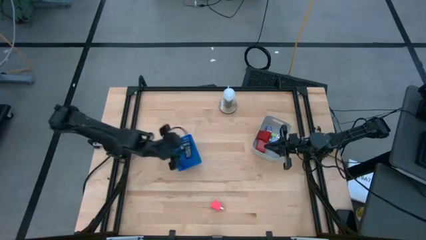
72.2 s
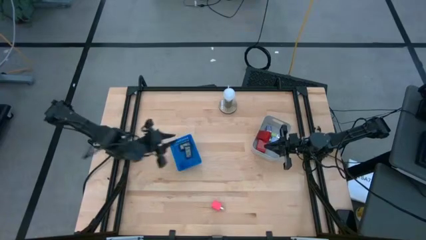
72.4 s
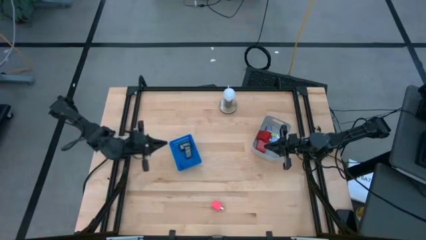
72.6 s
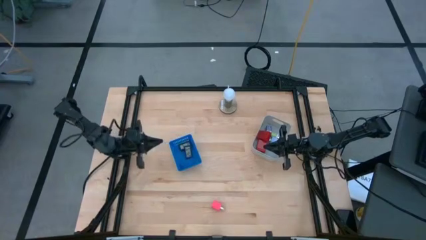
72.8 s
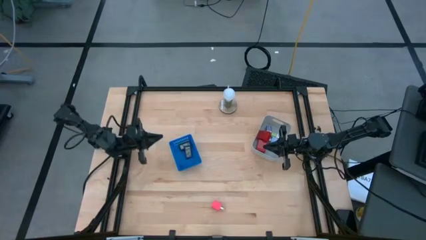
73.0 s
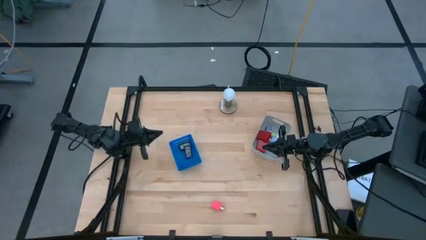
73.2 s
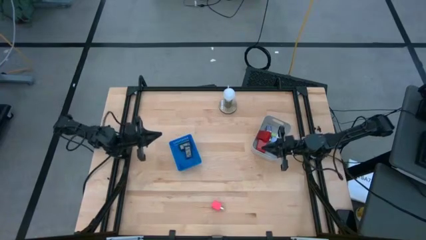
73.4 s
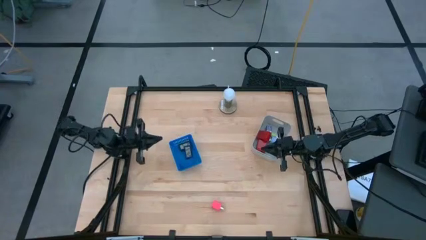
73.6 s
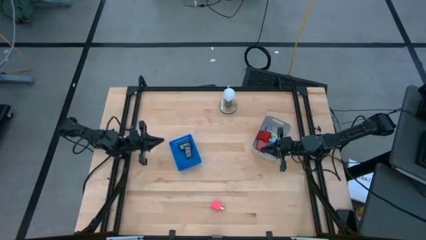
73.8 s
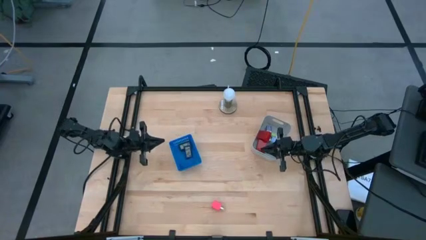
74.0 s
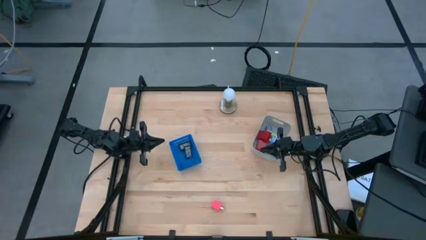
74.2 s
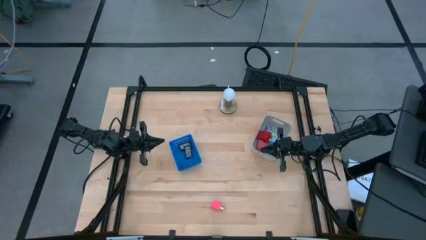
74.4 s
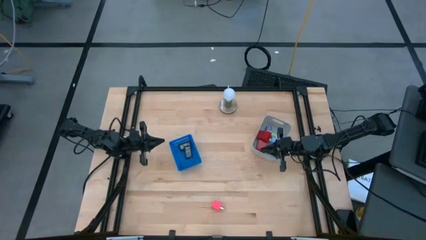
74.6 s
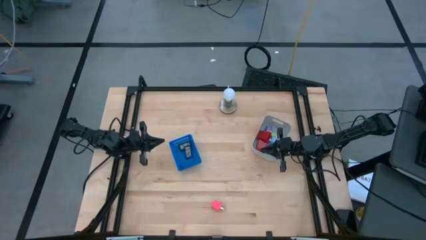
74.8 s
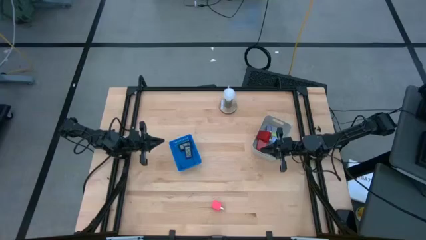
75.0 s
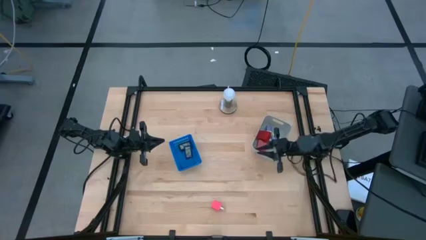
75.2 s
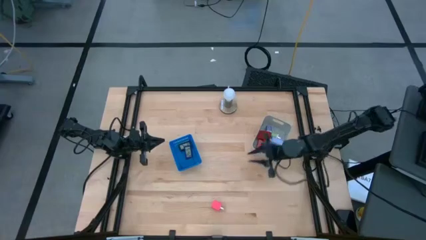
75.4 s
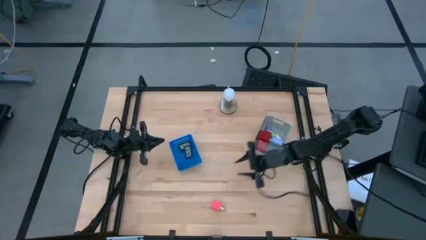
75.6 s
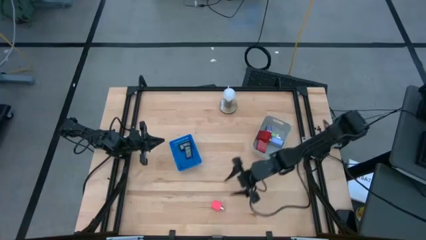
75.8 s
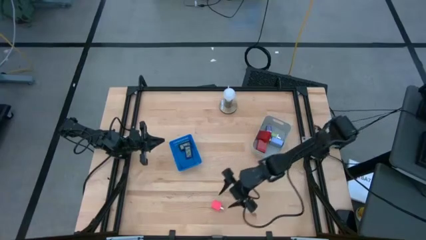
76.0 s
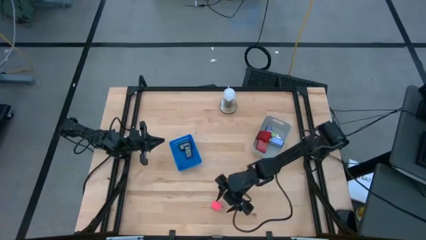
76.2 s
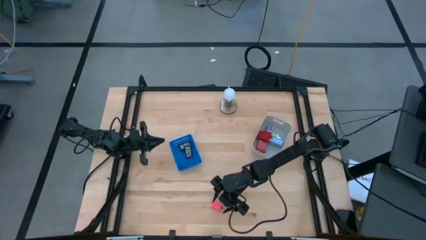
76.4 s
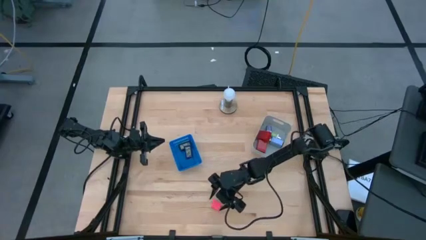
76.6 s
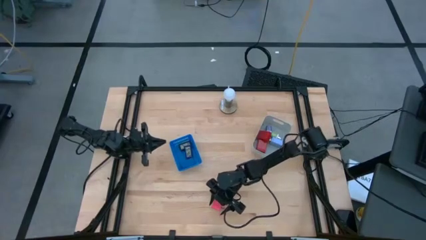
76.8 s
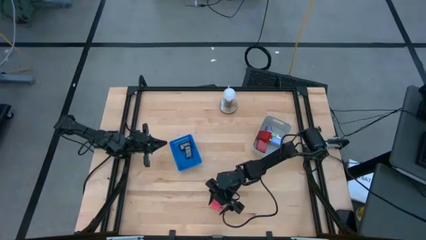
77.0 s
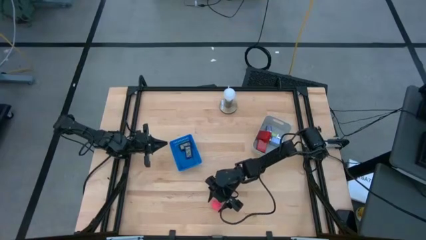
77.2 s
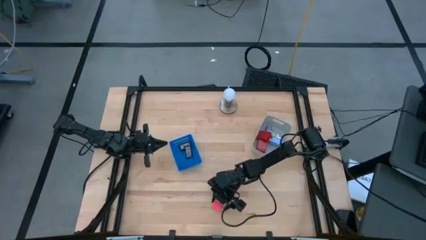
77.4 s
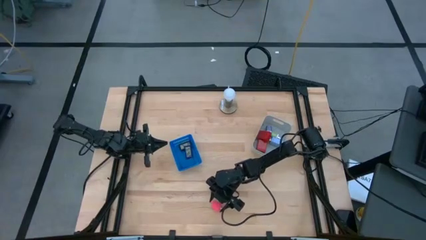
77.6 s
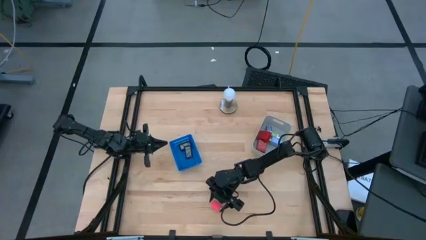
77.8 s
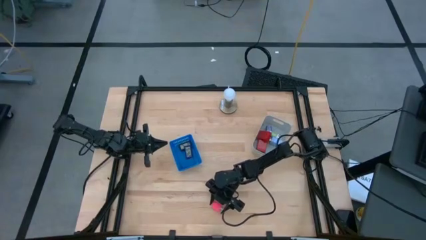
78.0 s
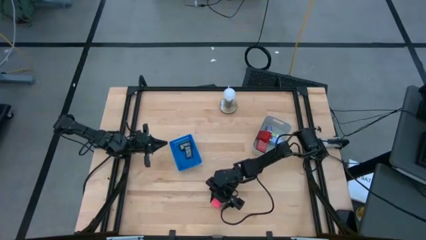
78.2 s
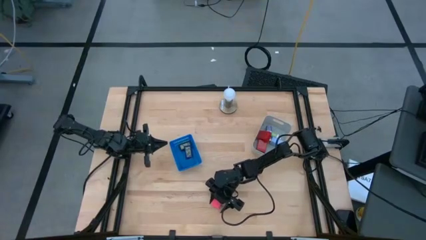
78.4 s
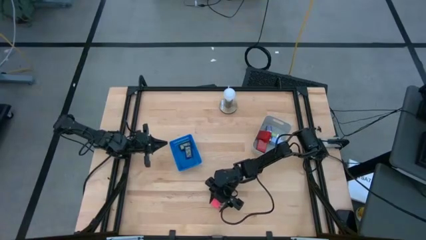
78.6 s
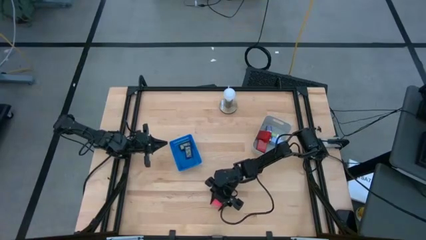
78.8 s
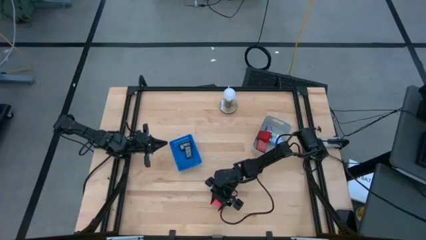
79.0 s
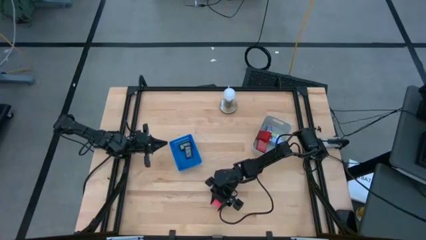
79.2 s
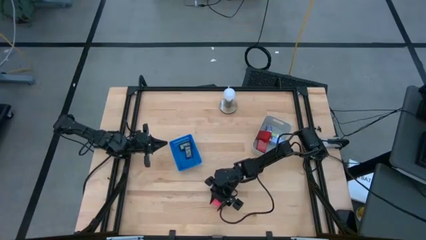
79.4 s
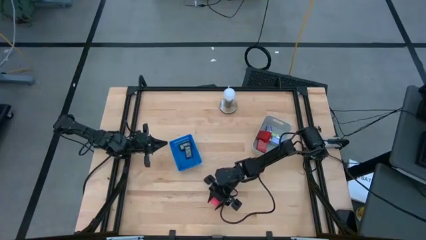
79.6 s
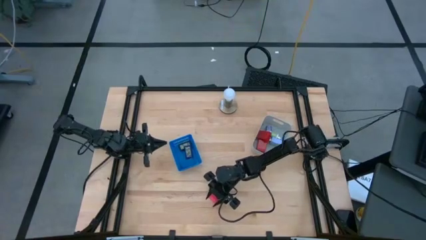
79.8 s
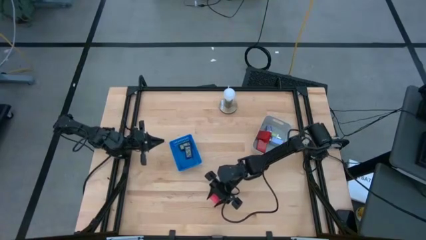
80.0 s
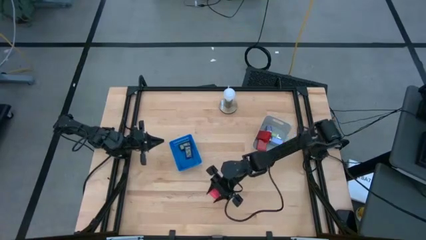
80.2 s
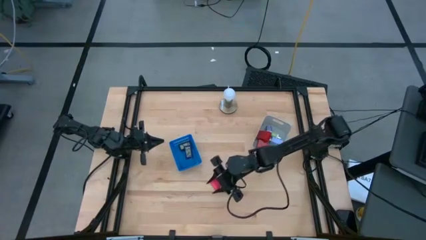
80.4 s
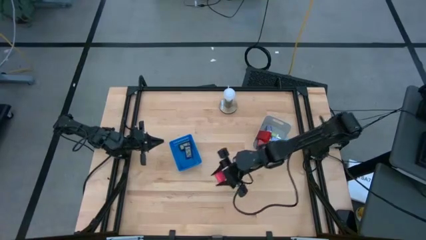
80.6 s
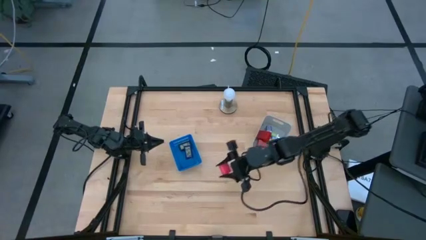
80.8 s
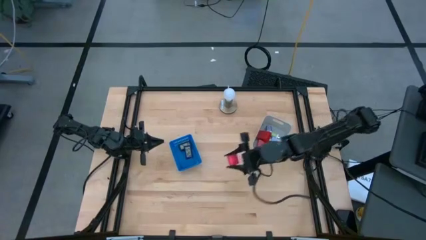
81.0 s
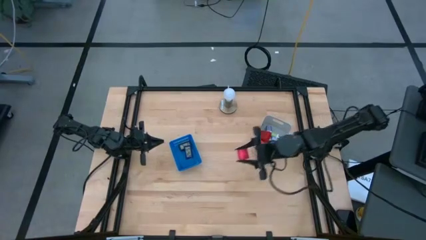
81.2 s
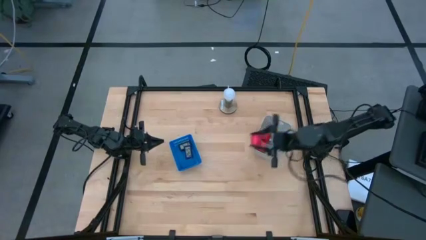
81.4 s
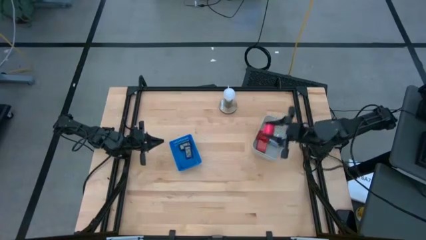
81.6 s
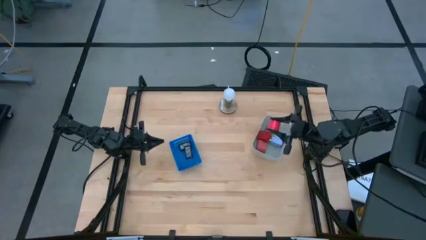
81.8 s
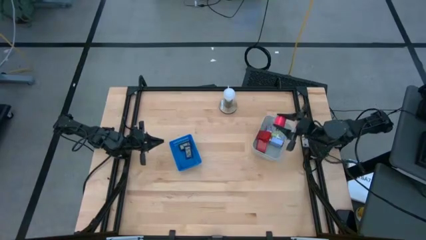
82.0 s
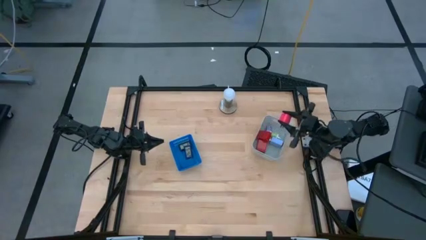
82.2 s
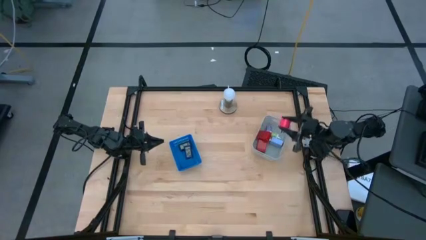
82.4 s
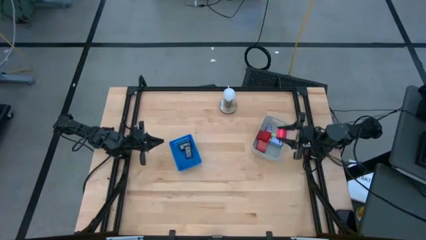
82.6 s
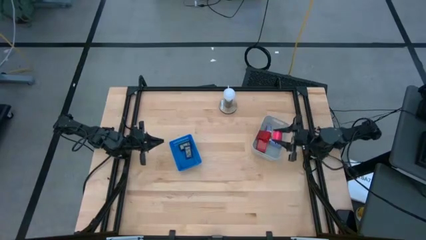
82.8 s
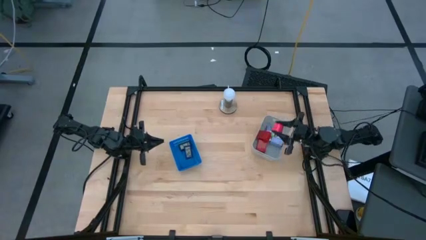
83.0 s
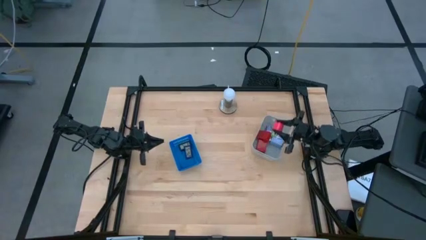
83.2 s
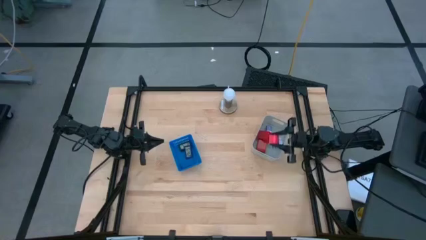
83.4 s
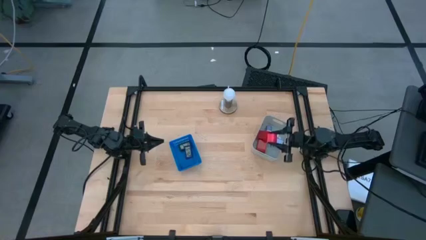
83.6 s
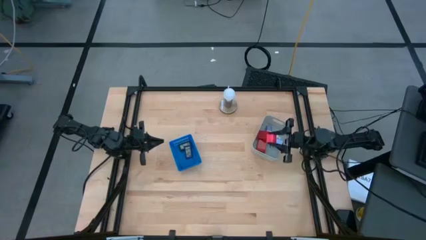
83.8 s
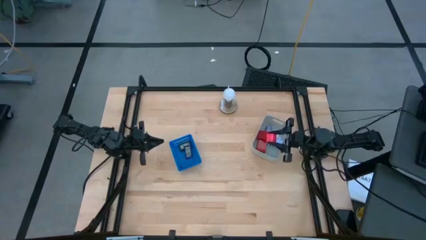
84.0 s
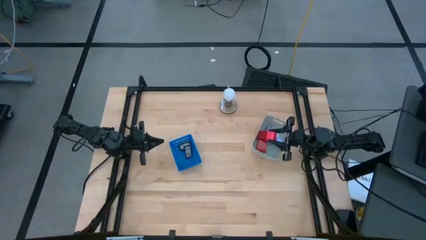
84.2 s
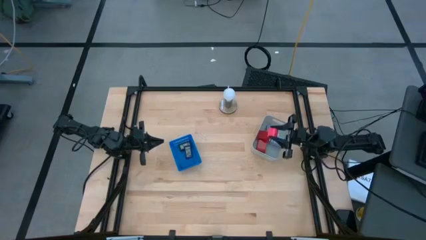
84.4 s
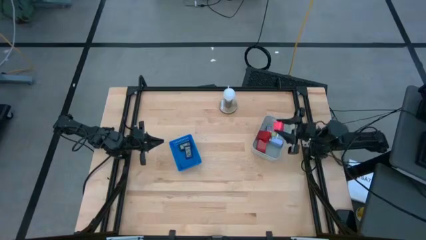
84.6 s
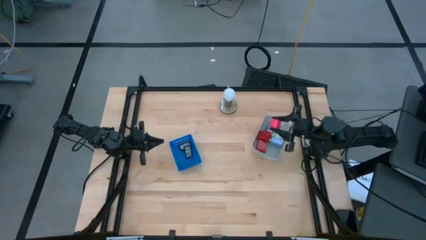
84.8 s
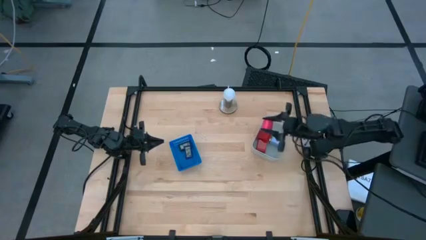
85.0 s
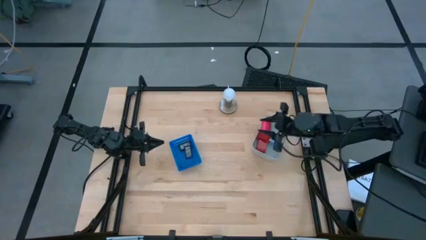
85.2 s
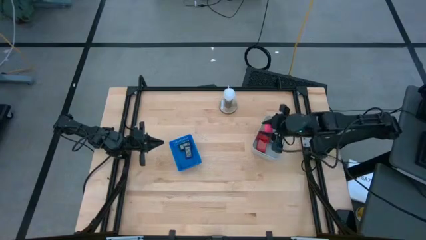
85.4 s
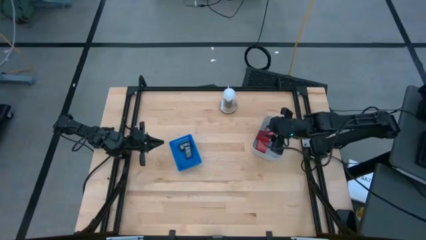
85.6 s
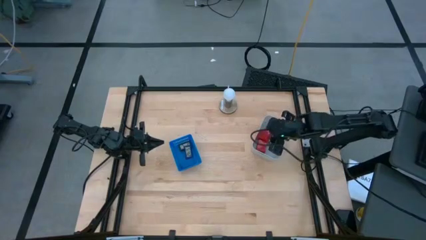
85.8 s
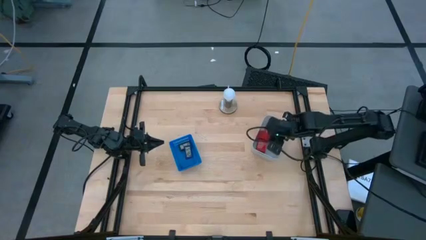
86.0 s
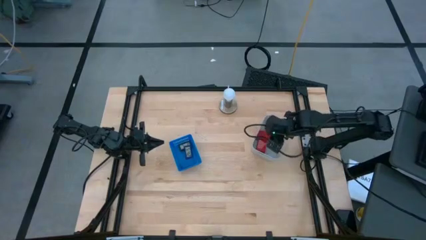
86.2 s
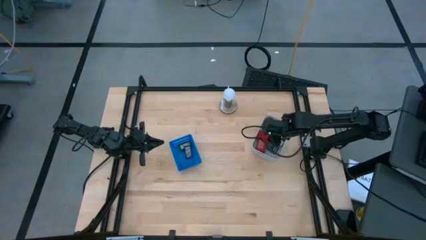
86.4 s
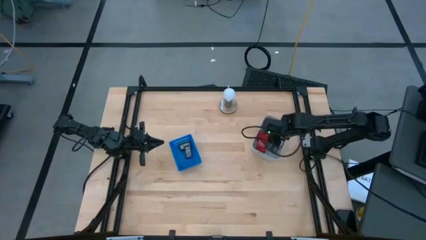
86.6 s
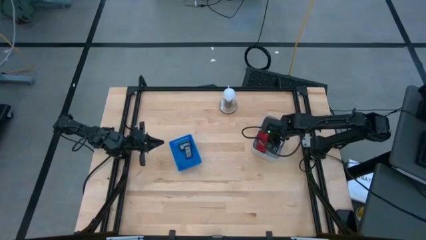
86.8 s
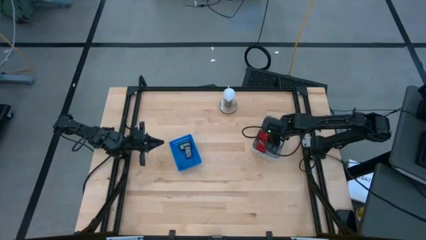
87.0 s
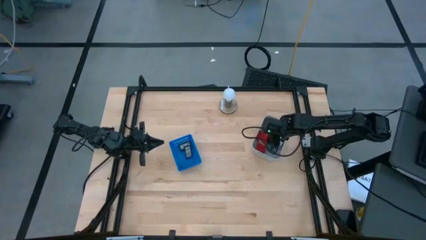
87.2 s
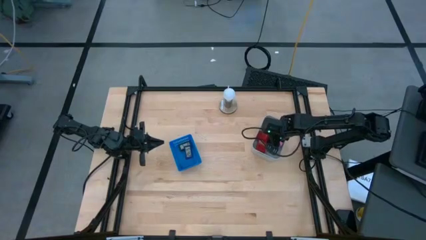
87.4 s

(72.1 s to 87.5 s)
Task: Pick & Place Office items
Put the pink charger adapter into the gray bin

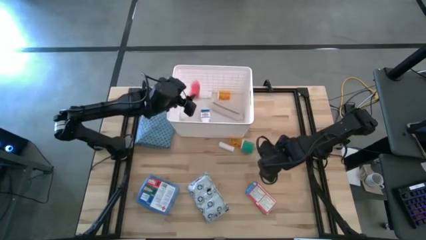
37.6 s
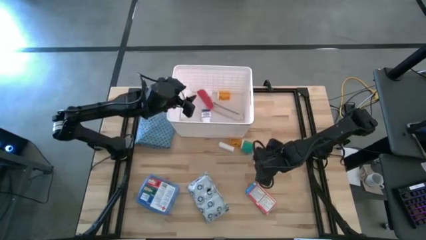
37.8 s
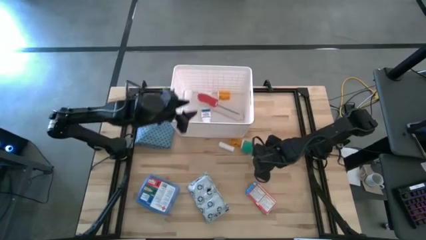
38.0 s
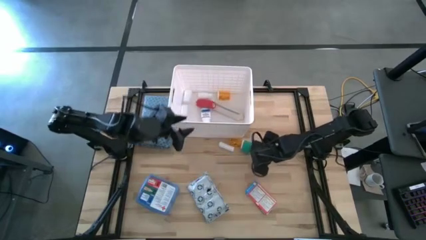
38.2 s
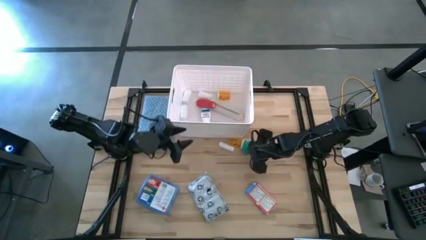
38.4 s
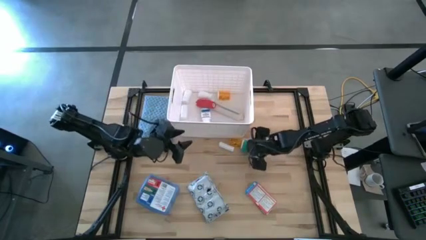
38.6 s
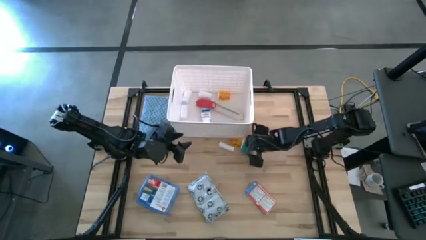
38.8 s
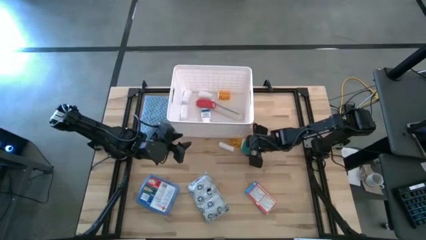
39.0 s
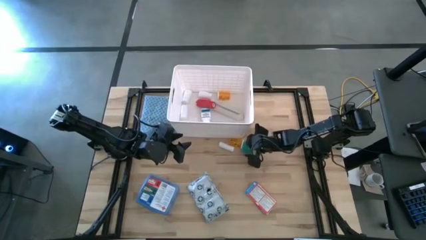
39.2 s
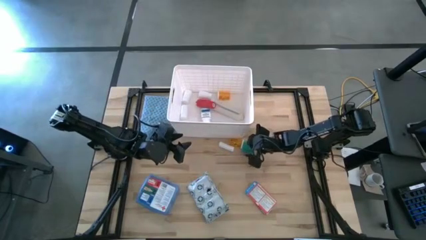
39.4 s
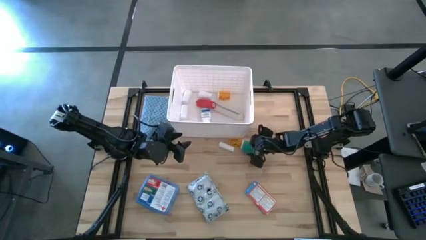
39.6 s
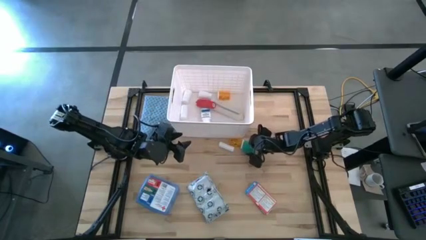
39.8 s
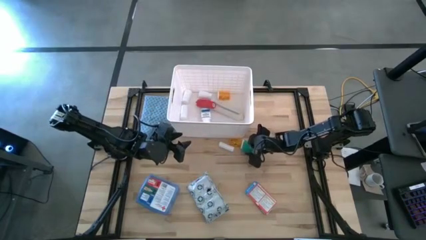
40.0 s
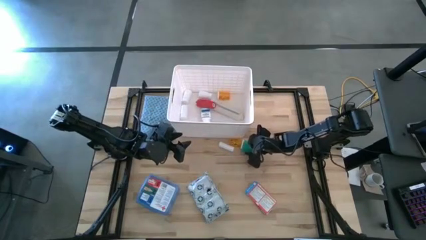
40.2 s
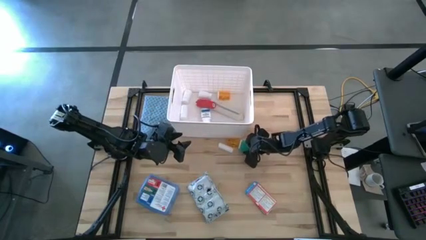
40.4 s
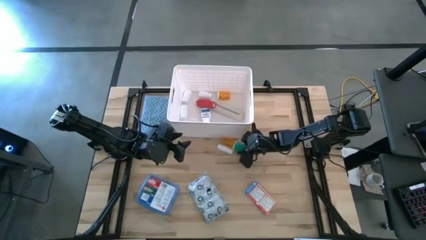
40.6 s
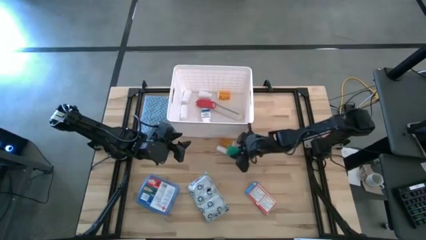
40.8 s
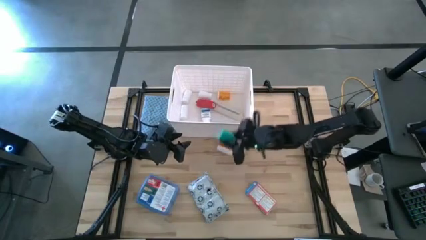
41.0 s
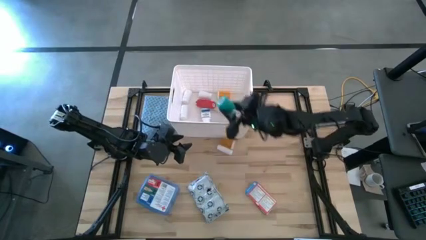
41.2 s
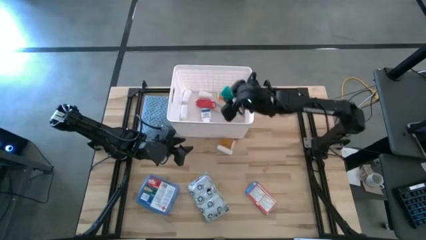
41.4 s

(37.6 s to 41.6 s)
Task: Pick & place medical supplies in basket/bin
Put the blue rolled bandage in the white bin
